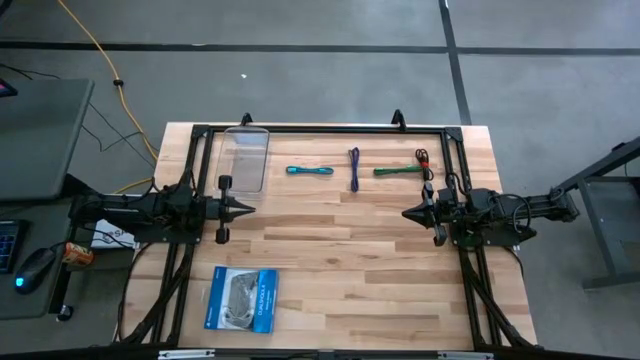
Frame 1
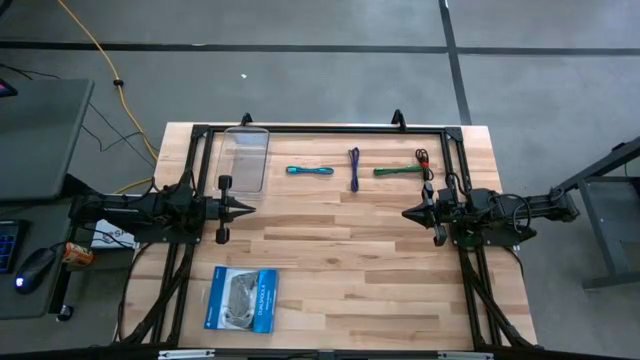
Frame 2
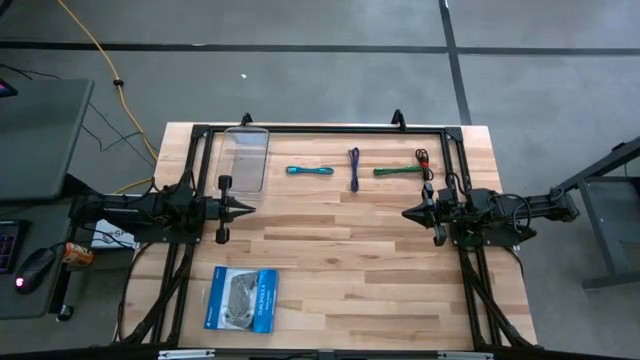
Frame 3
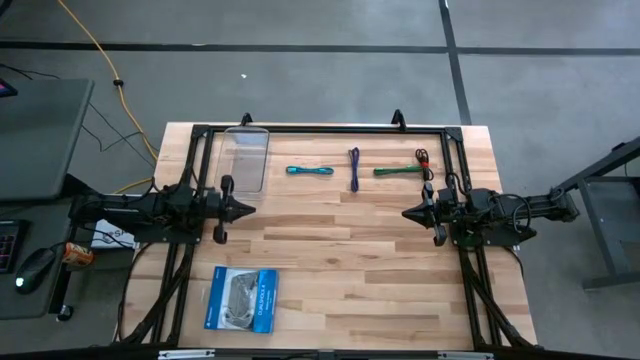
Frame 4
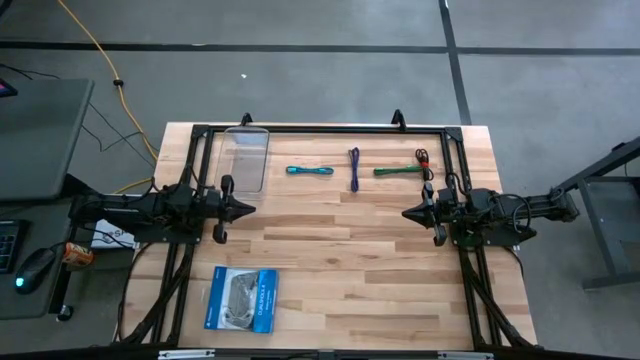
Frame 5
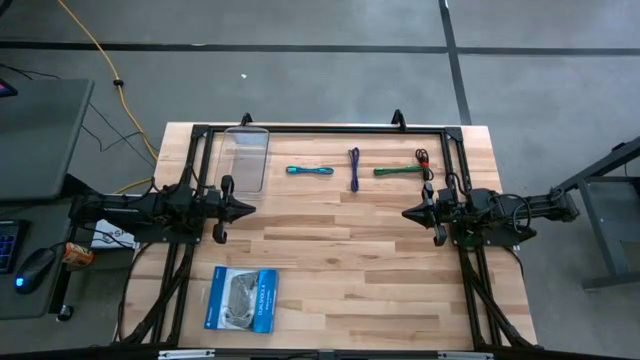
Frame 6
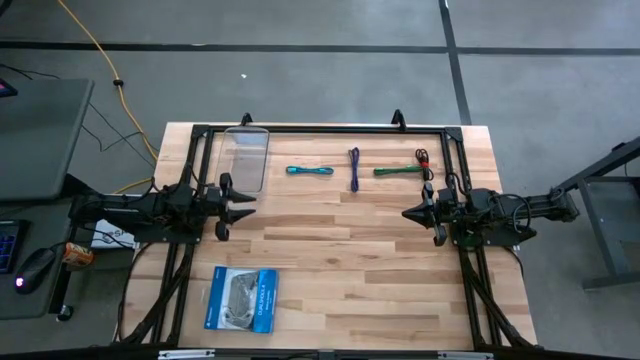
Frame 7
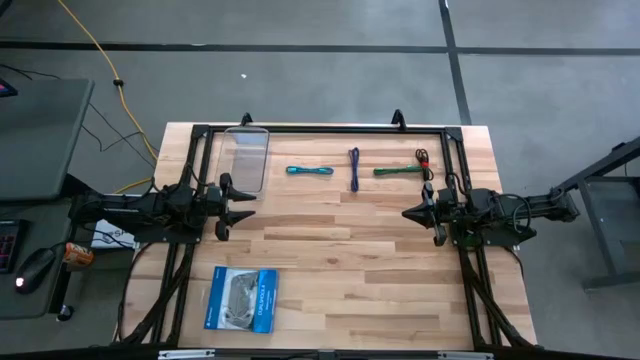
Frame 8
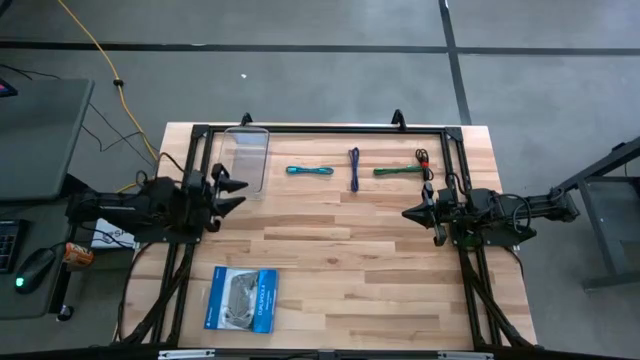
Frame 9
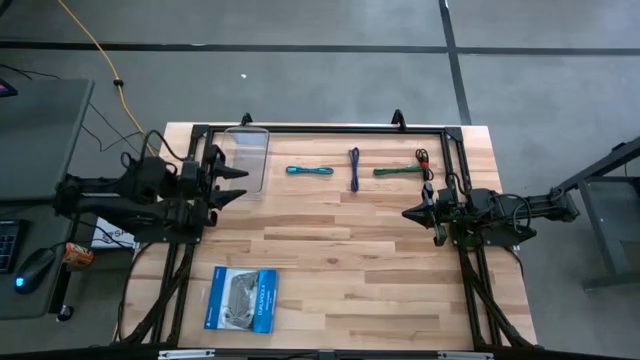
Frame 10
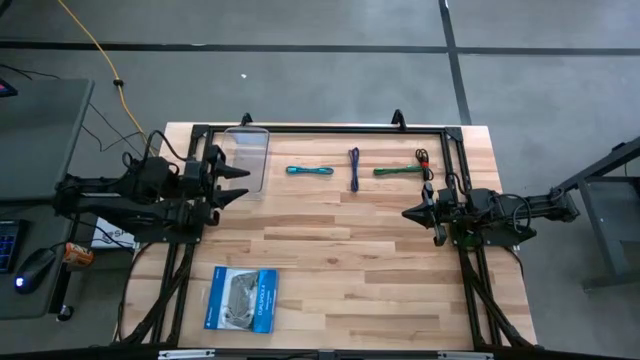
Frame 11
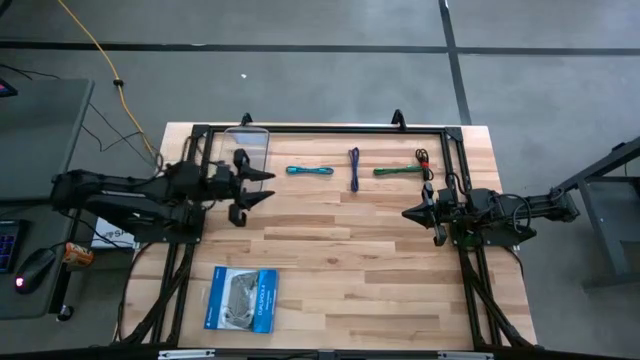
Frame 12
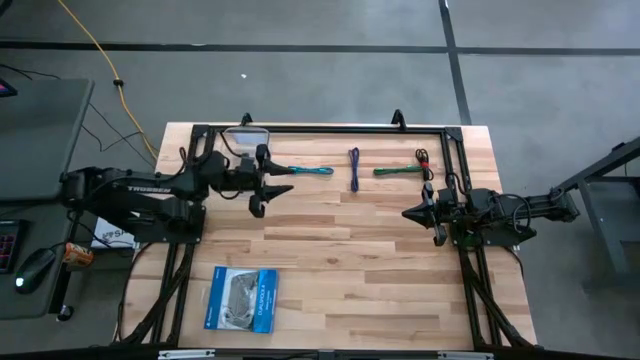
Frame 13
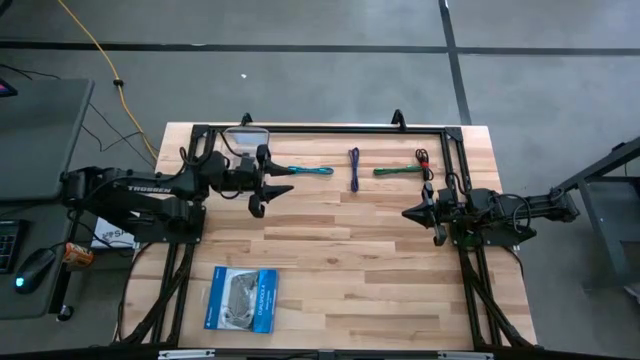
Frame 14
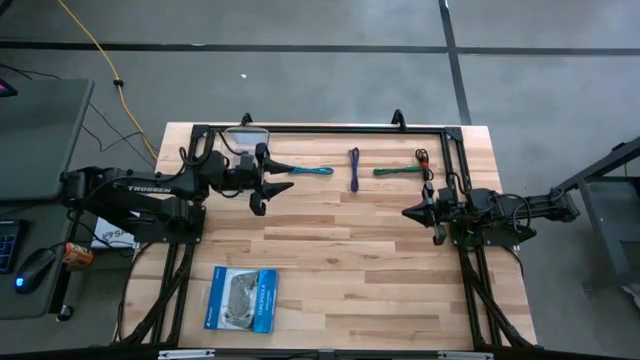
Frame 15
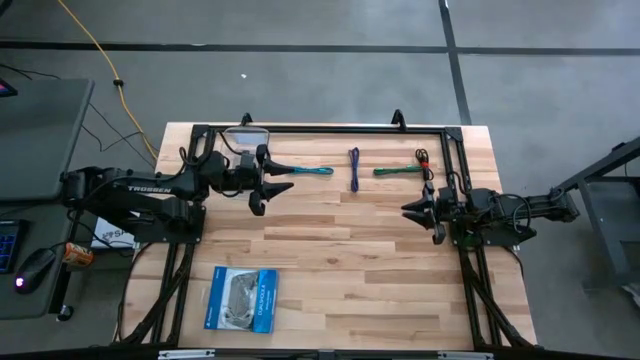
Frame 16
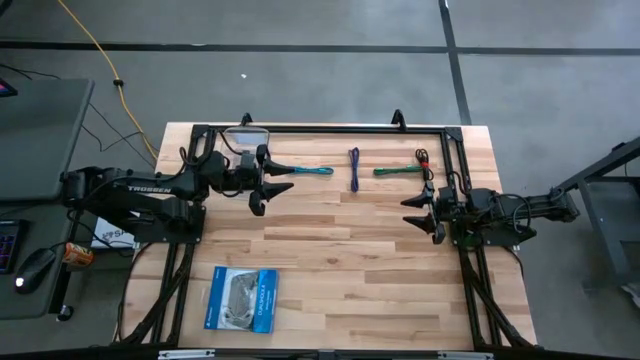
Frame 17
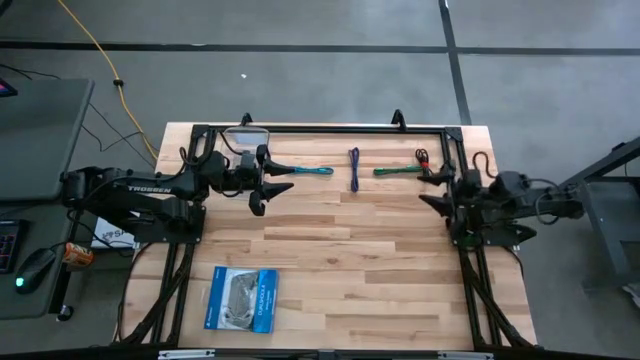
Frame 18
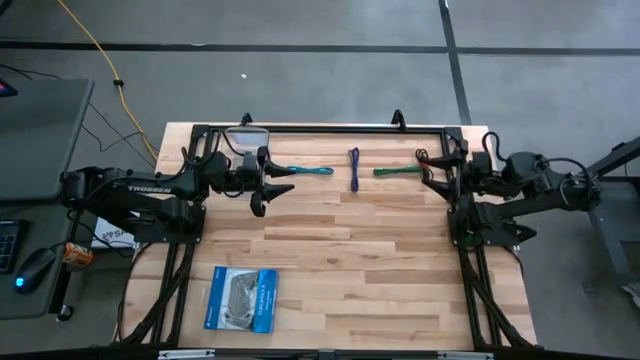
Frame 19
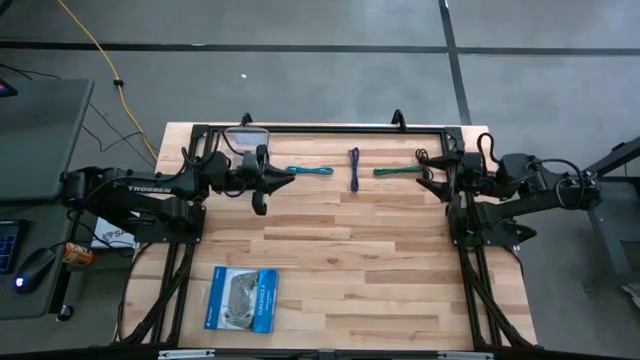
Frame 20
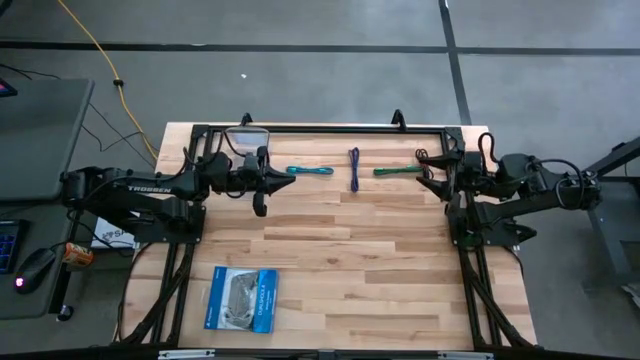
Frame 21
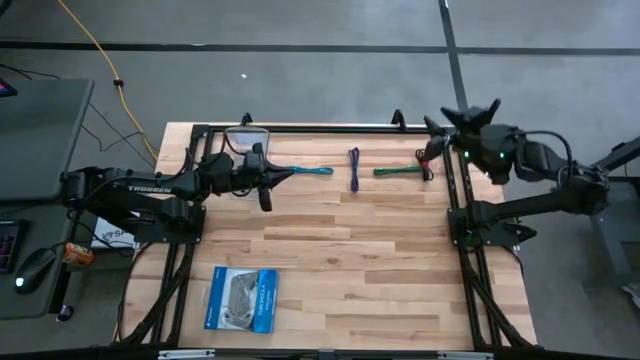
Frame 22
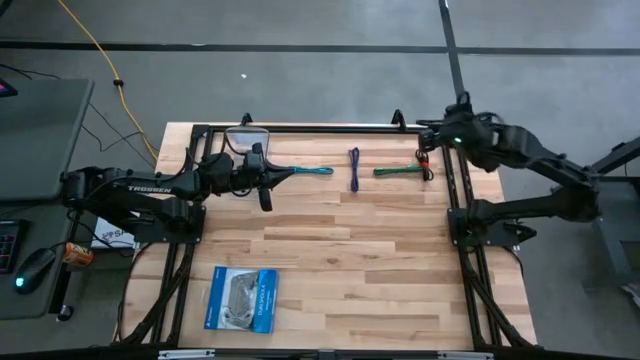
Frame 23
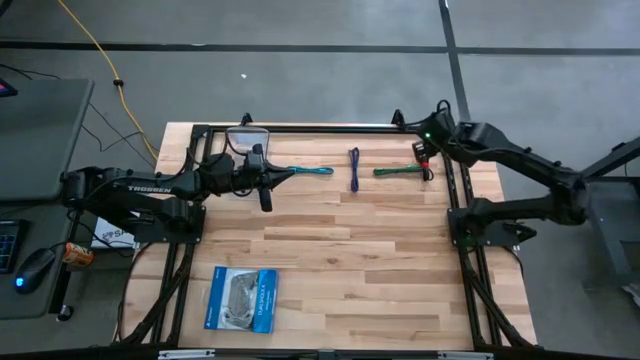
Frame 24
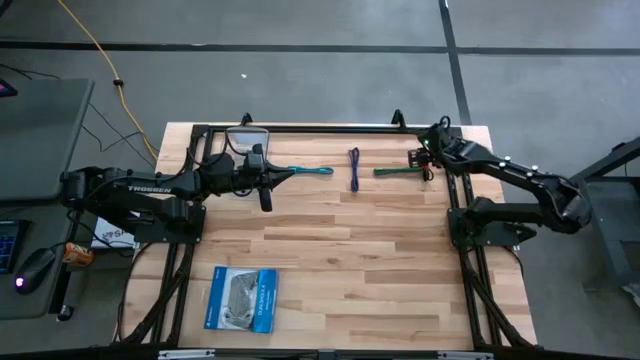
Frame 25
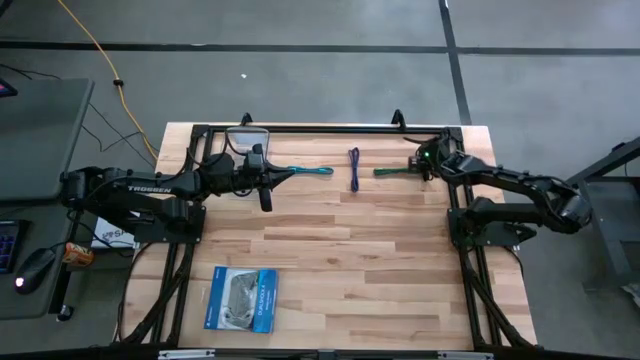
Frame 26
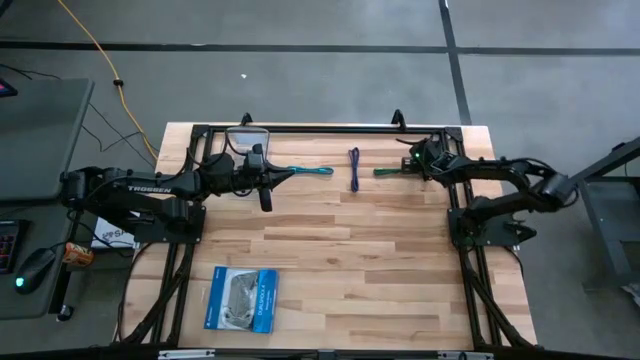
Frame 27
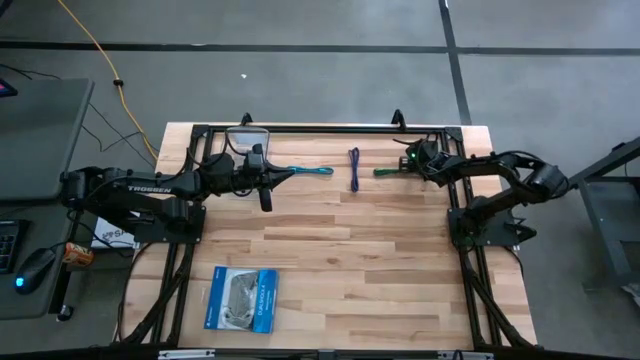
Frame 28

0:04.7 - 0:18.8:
Task: Pick and place USB-C Cables
Put the black USB cable into the transparent bin

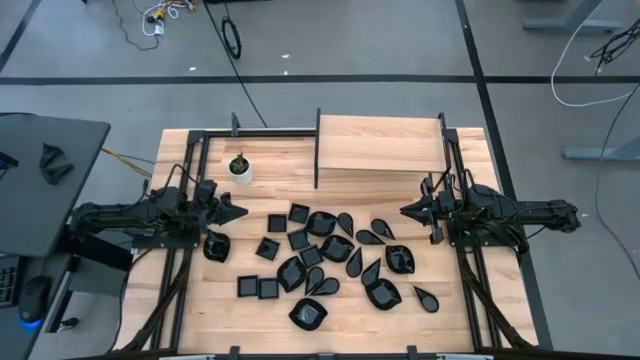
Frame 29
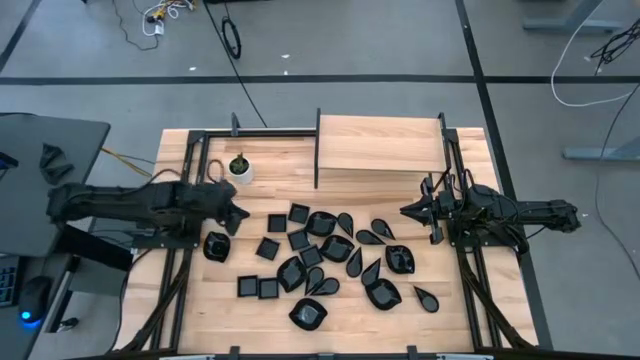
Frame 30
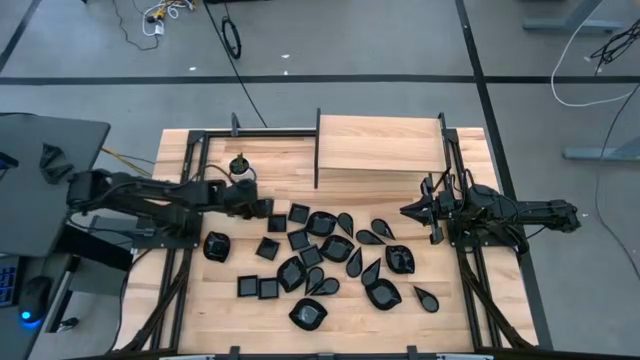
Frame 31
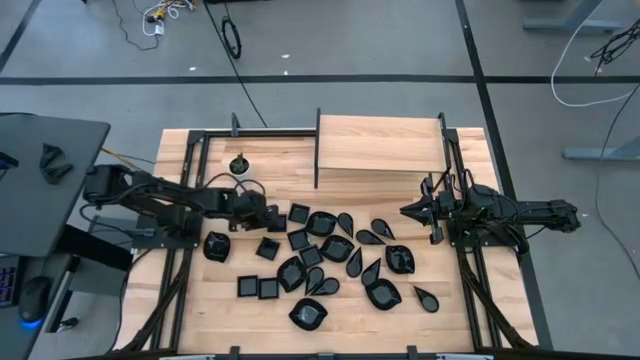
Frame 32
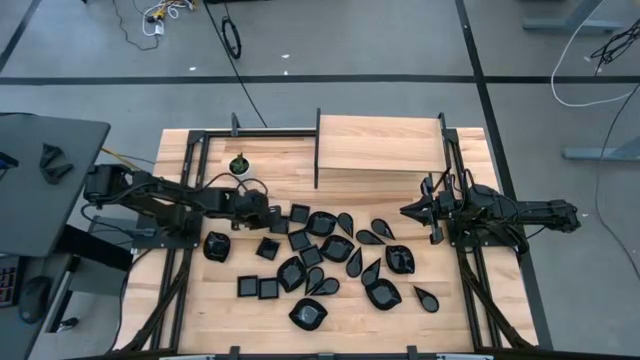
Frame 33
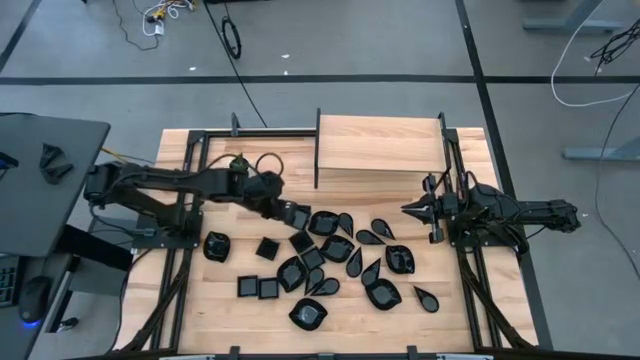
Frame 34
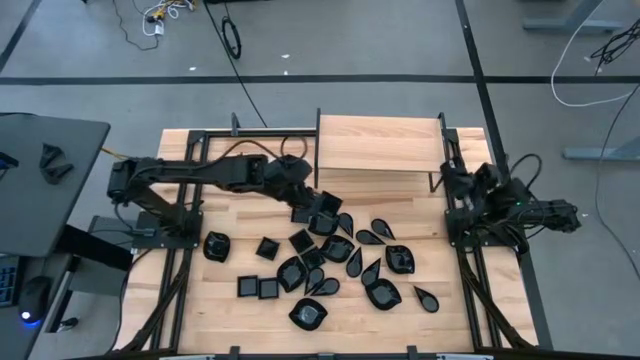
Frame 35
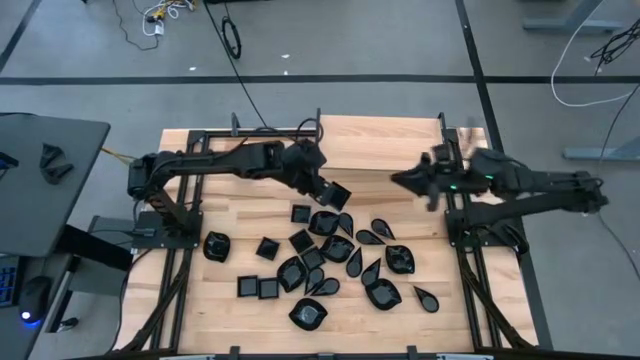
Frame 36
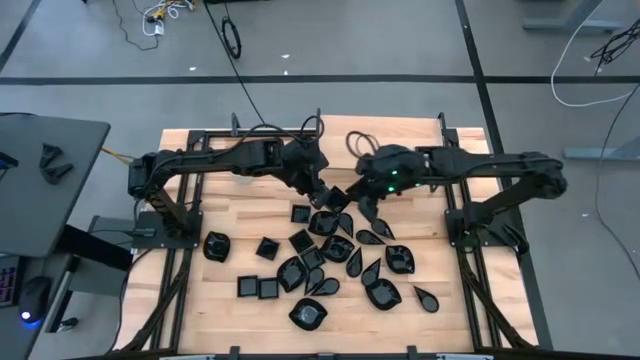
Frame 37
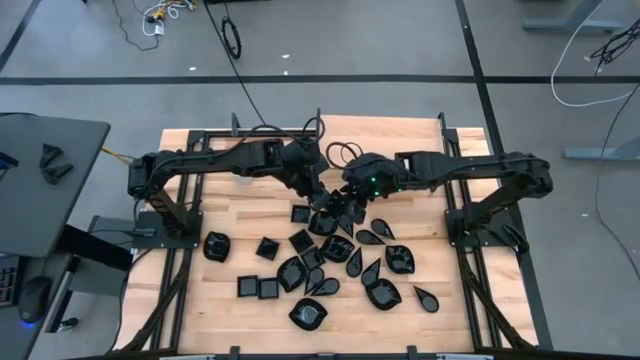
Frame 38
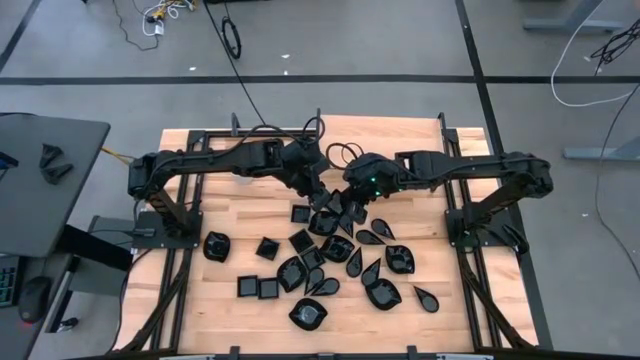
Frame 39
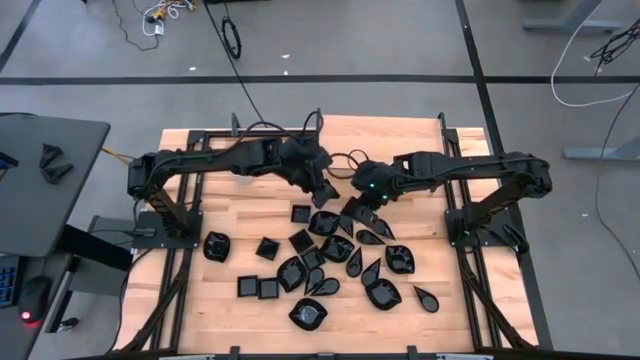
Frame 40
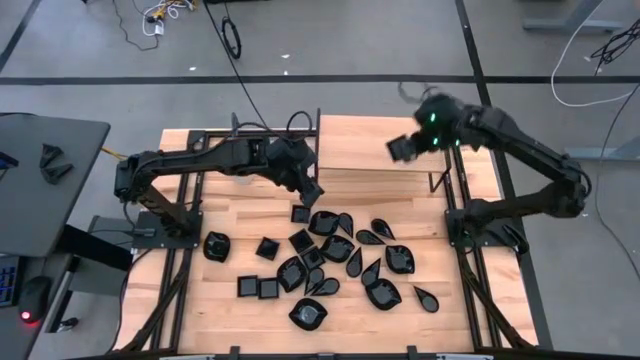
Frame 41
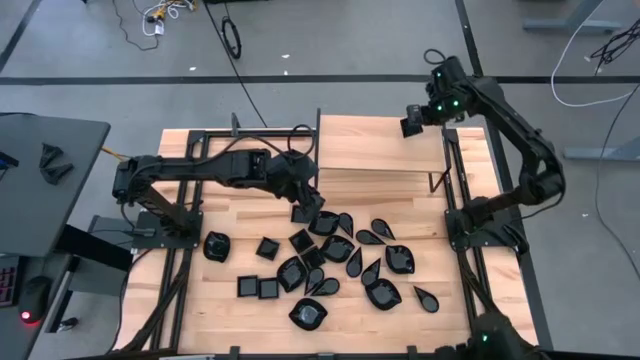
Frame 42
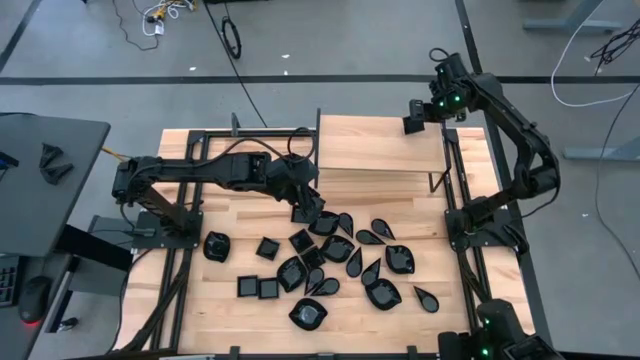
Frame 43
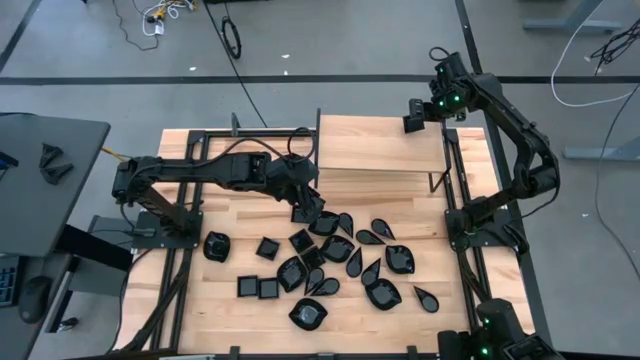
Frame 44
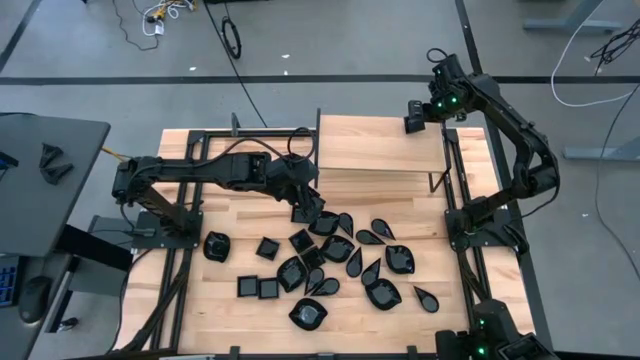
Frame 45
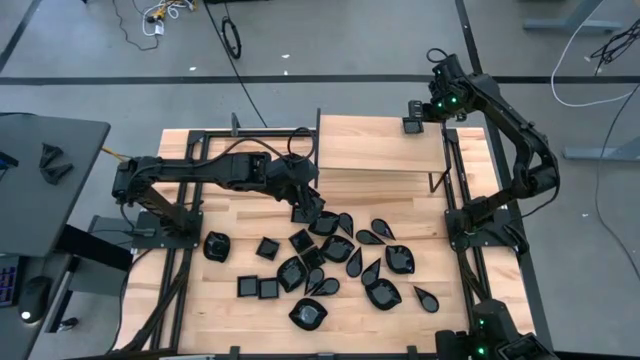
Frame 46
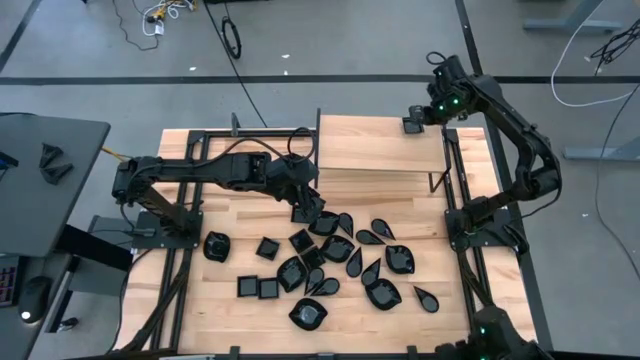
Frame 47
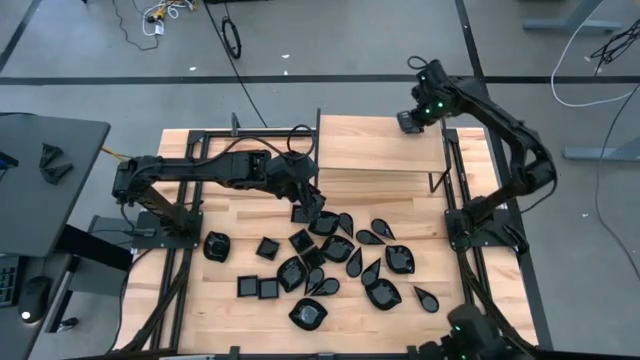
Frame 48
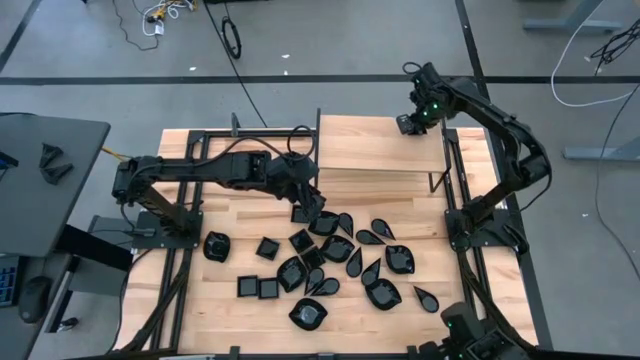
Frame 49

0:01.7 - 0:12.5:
Task: Pick & Place Mini shaped plates
Put the square plate on the shelf
